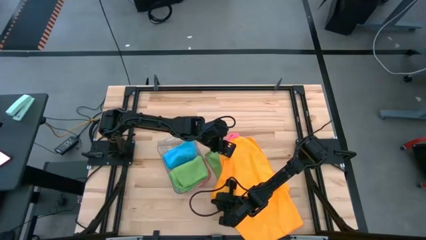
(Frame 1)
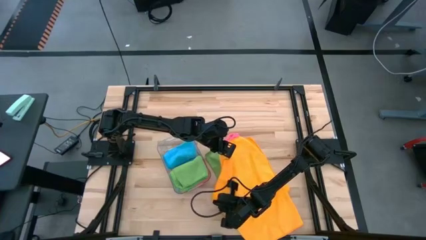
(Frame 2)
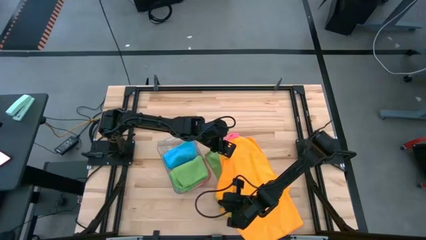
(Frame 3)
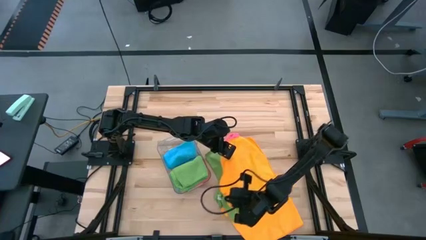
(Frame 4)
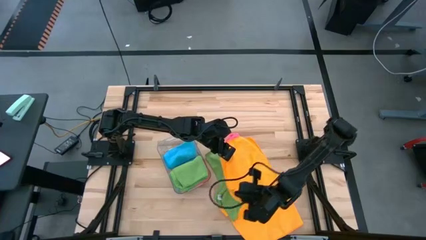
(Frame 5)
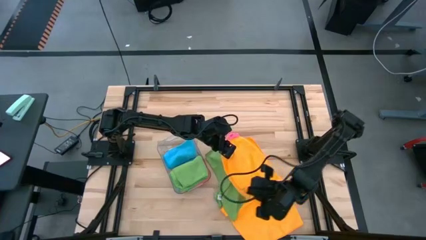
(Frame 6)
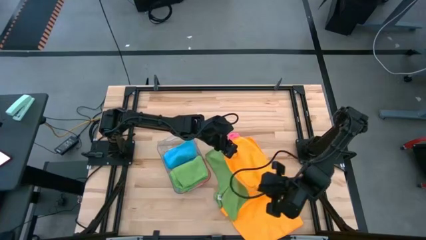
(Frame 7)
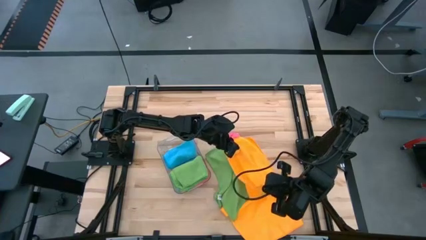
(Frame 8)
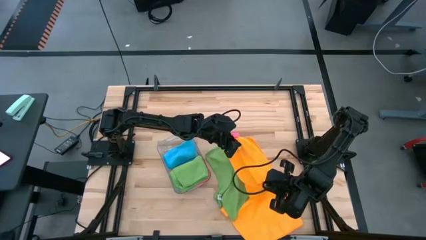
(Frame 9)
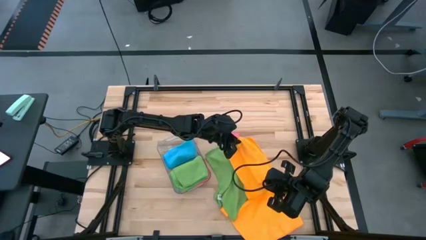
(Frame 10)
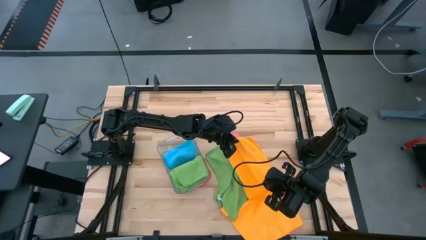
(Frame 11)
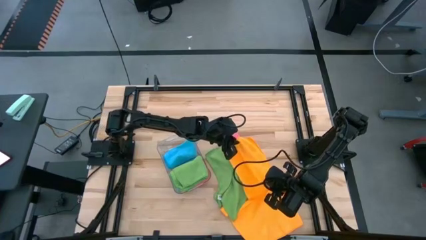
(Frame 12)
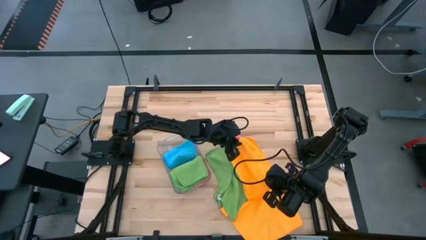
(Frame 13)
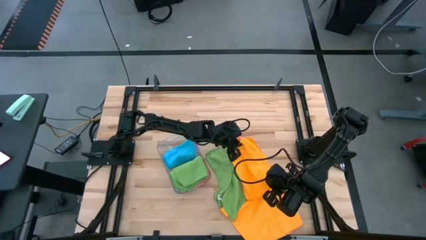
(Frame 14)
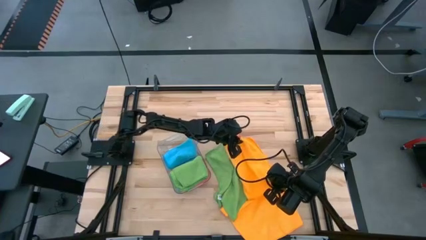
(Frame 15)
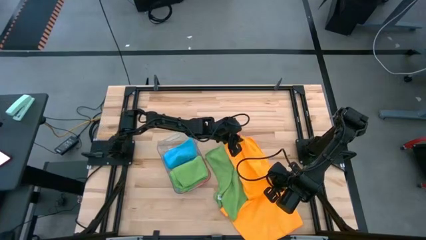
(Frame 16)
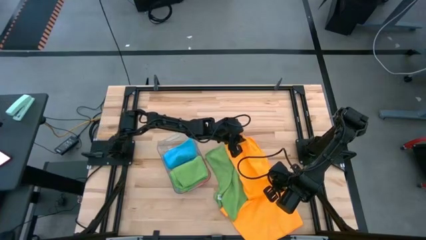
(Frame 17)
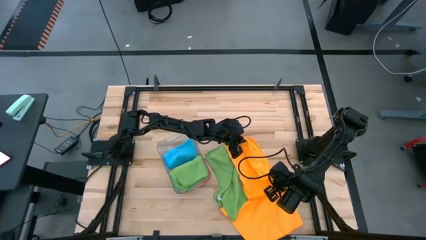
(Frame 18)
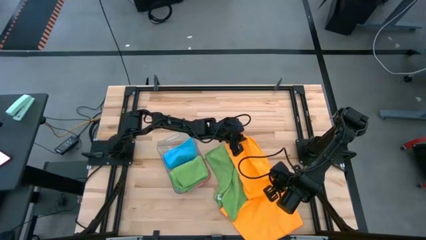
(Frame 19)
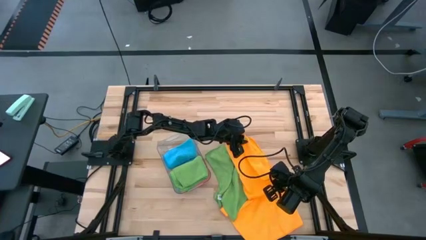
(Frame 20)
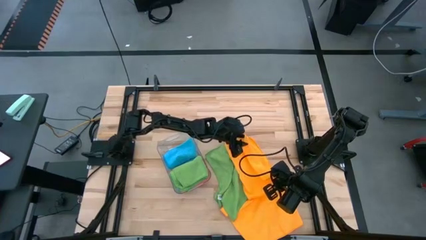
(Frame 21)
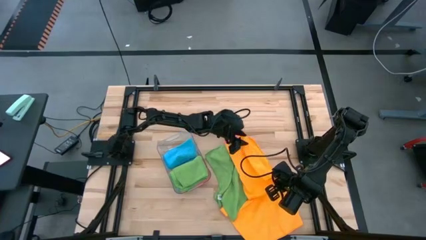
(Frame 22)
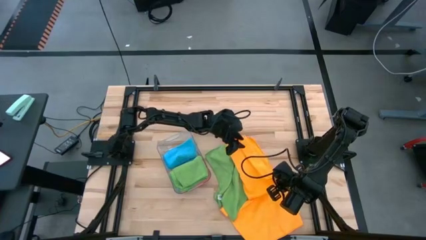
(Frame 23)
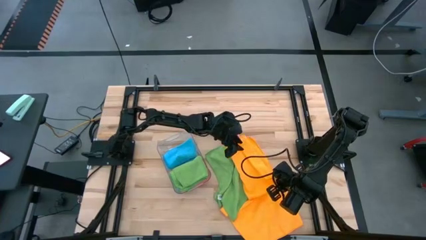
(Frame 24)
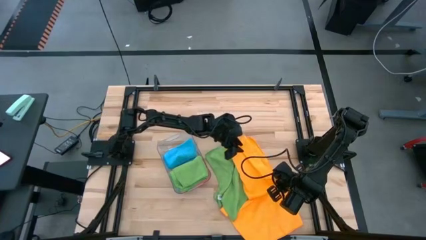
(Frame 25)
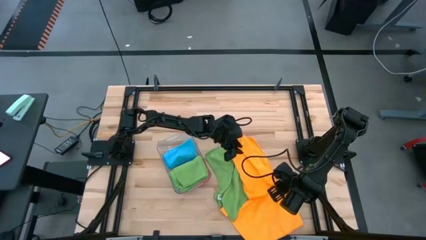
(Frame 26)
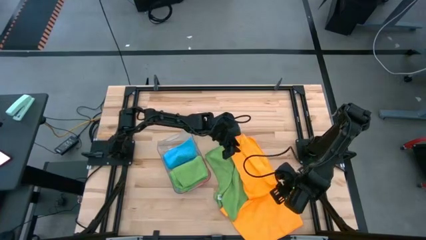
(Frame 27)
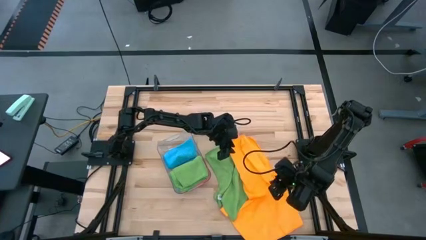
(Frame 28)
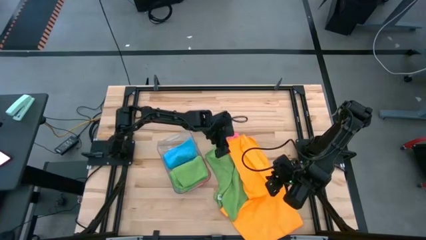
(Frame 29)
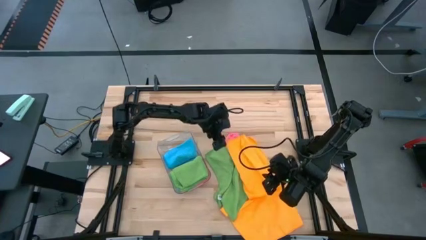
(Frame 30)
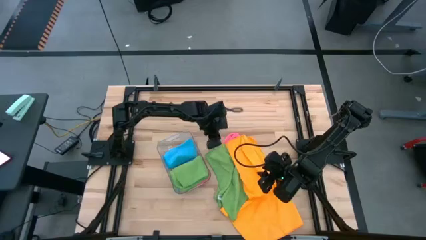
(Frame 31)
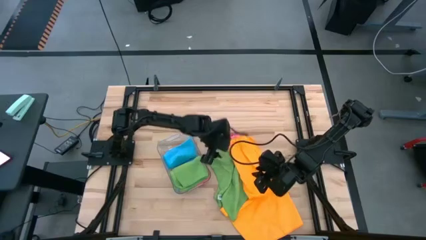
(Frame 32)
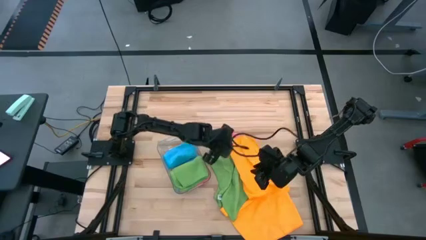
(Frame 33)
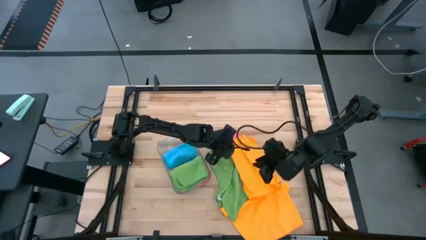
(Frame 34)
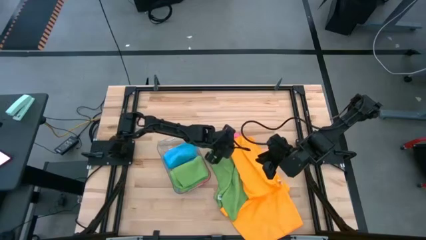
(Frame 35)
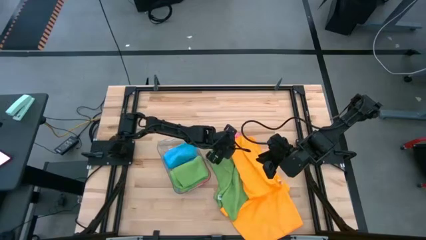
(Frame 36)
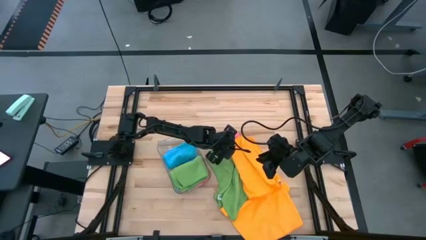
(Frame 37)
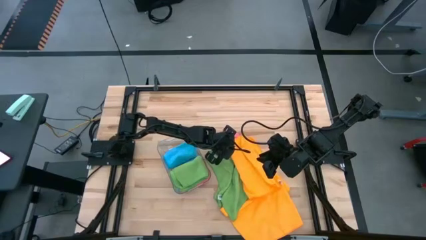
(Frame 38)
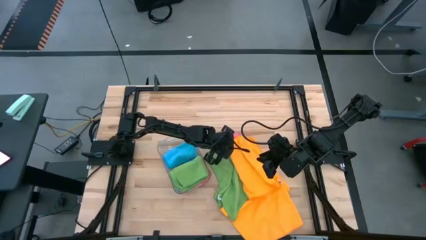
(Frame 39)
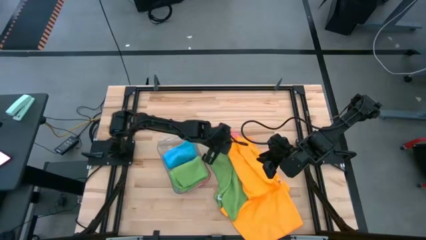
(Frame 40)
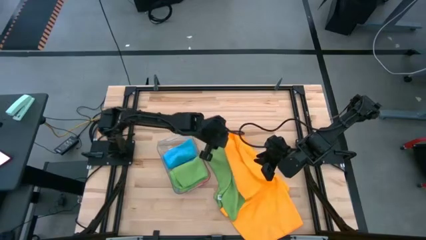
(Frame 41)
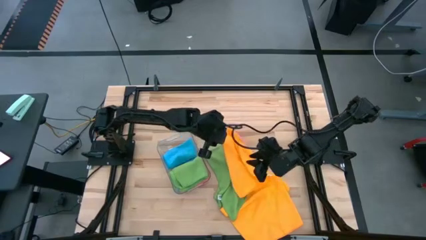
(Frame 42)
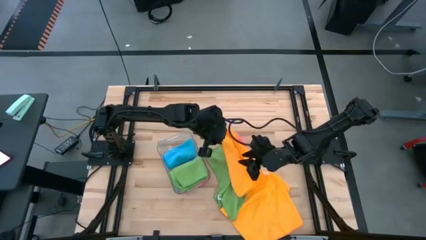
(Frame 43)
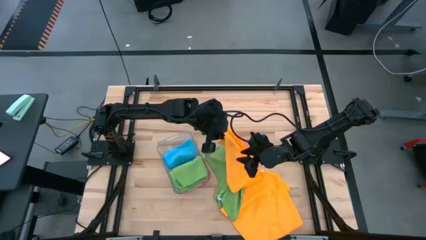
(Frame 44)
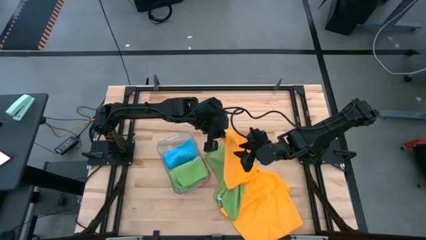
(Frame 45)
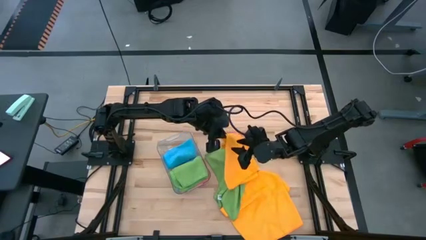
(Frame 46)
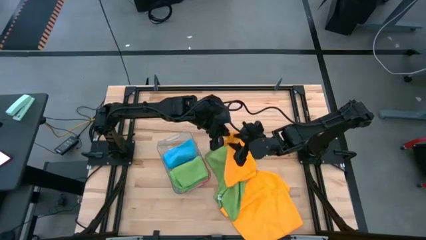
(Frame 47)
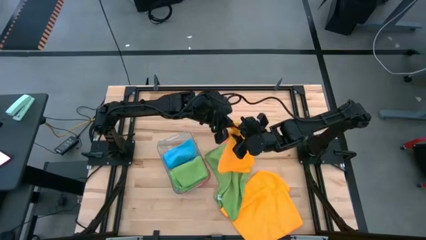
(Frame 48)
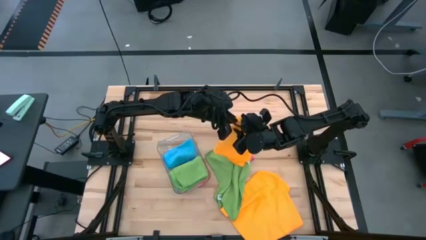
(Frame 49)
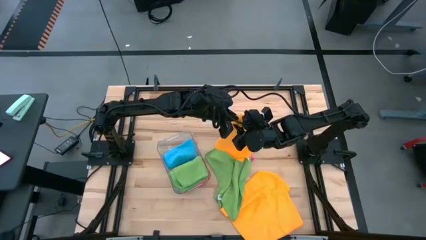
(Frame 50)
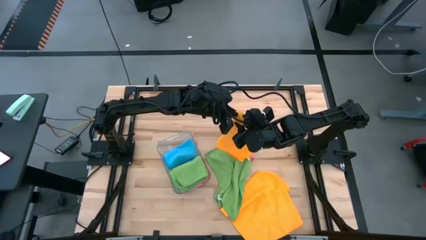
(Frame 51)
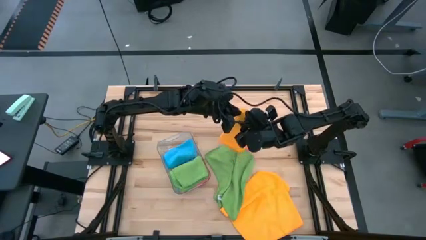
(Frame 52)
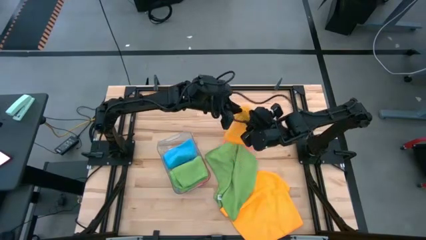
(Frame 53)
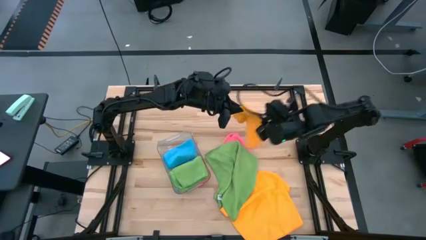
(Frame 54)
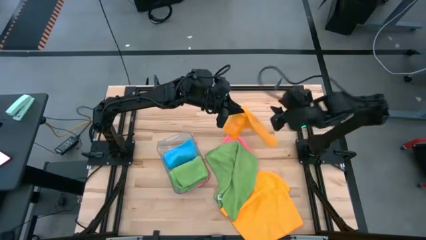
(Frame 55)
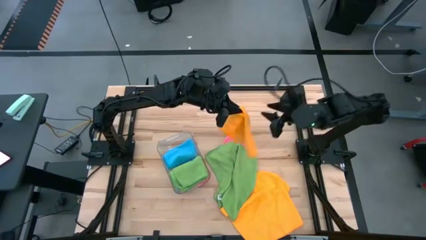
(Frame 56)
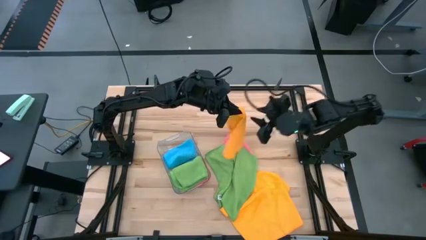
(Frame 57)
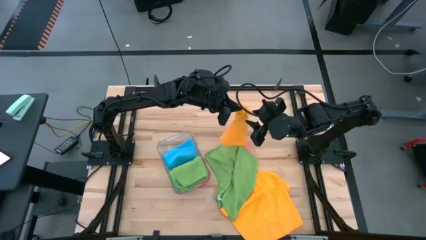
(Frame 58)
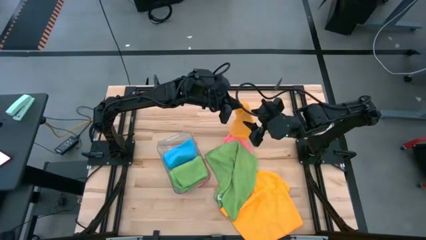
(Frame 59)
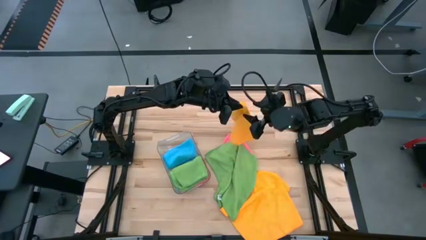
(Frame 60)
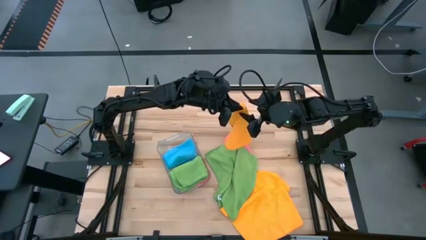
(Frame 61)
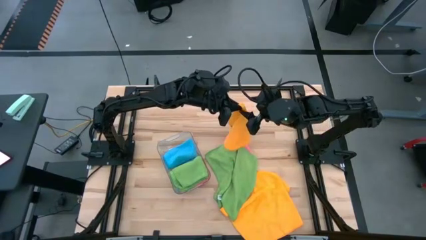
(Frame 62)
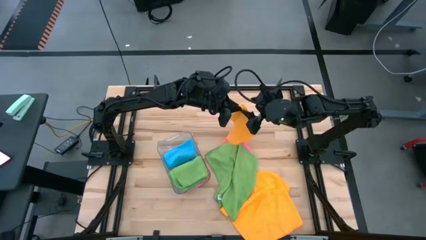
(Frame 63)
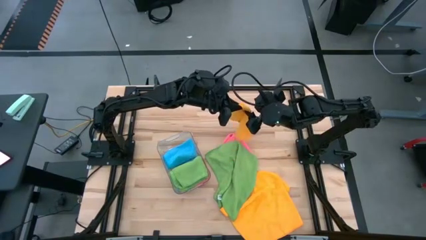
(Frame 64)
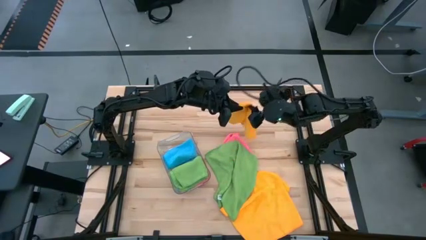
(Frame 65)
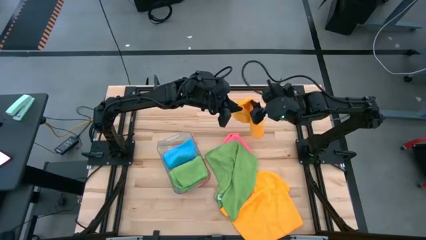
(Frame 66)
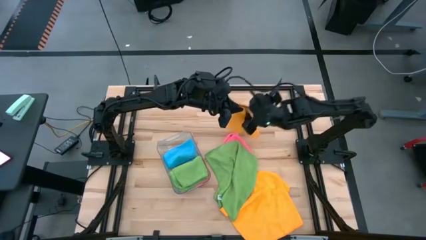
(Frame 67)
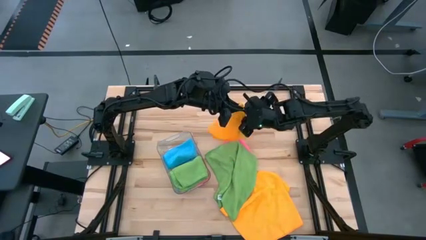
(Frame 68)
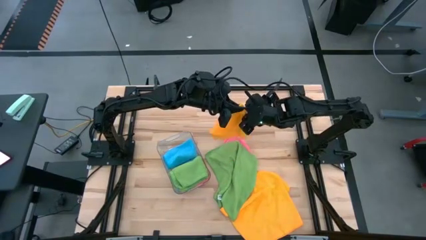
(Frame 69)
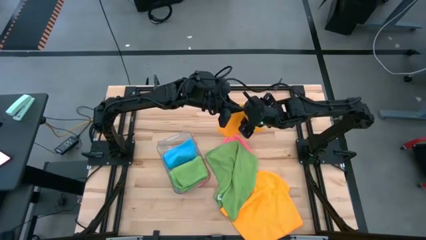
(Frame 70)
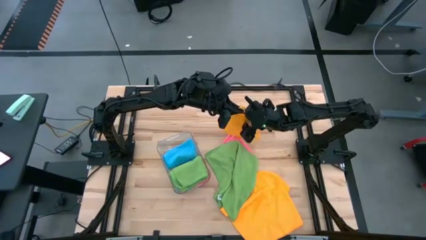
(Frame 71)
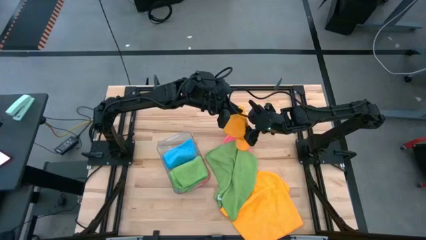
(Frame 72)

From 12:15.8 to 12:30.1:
Task: Fold microfiber towels
Fold the left yellow towel
